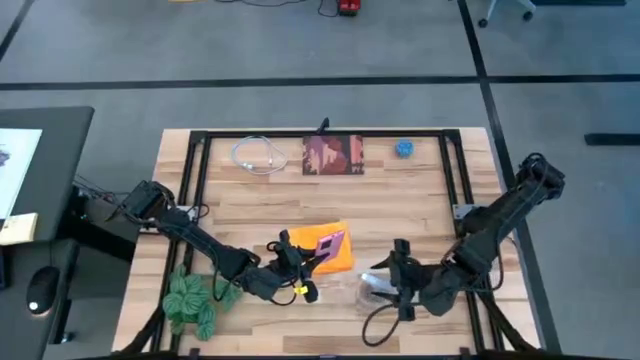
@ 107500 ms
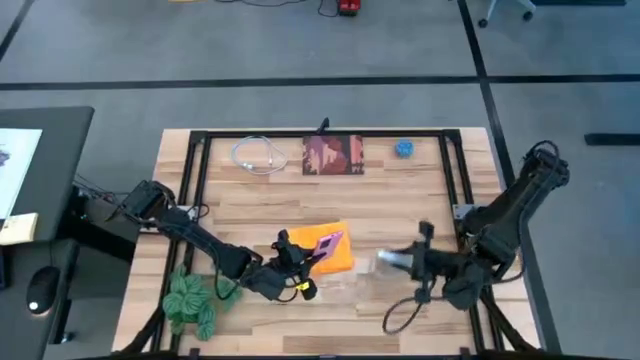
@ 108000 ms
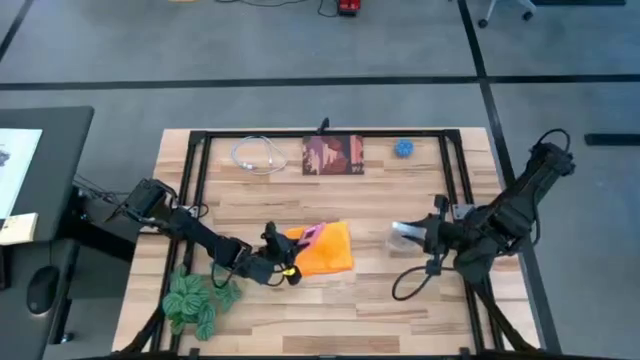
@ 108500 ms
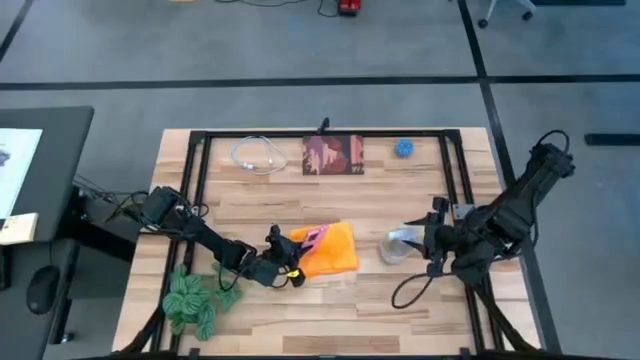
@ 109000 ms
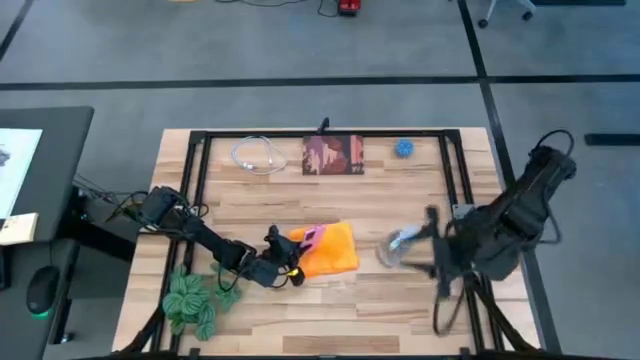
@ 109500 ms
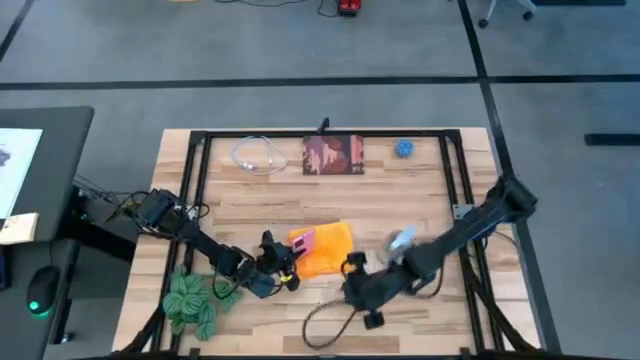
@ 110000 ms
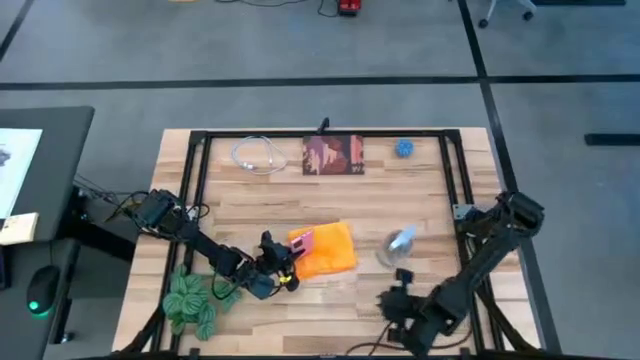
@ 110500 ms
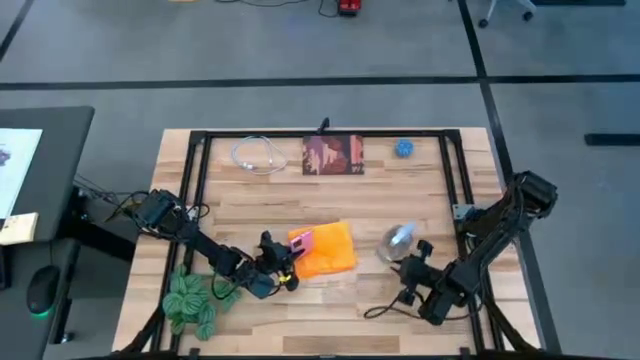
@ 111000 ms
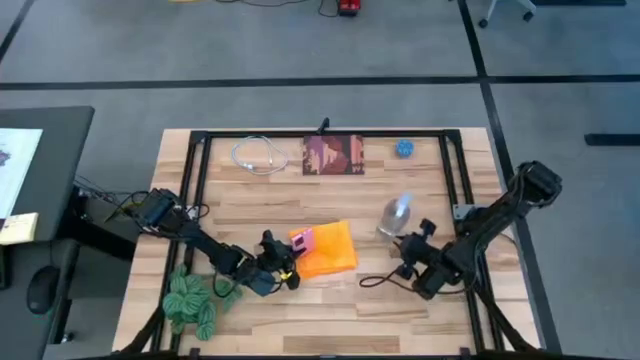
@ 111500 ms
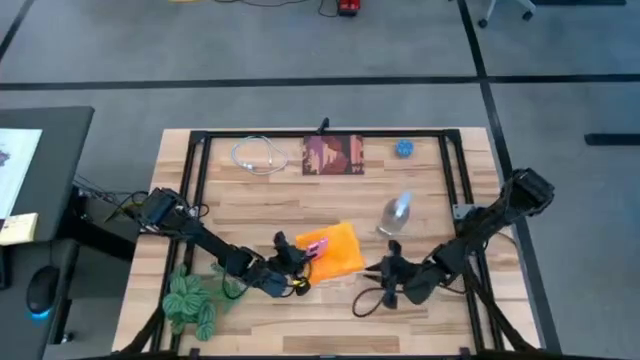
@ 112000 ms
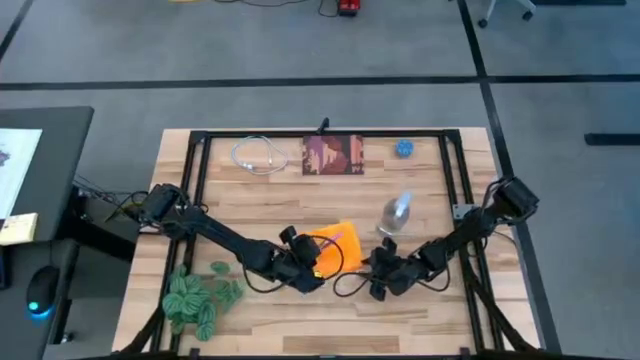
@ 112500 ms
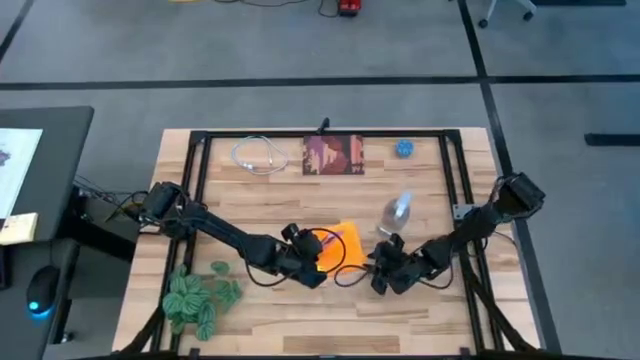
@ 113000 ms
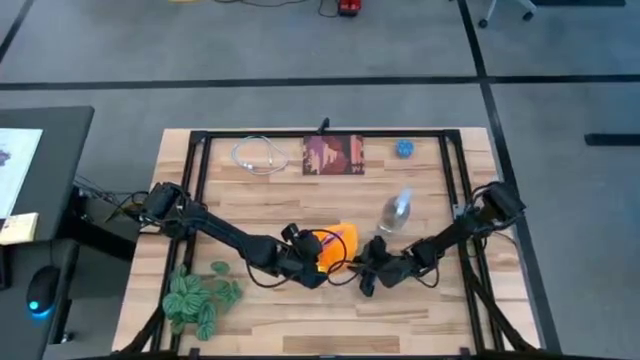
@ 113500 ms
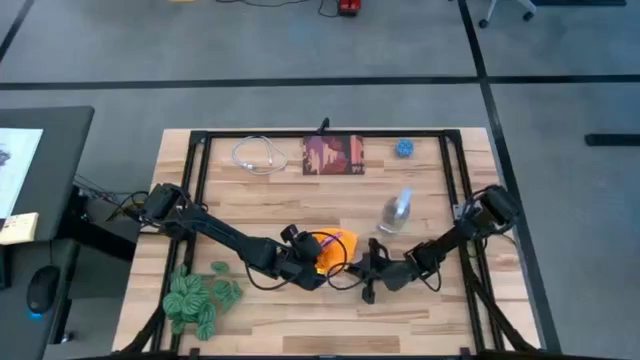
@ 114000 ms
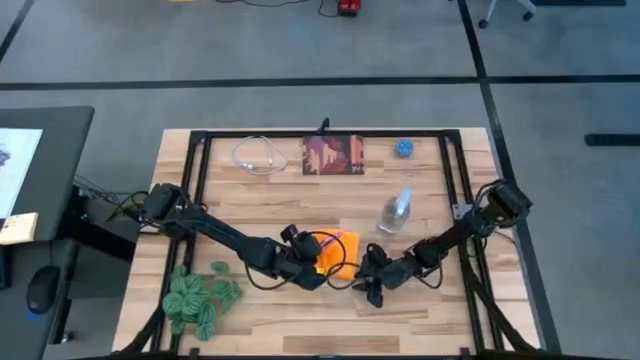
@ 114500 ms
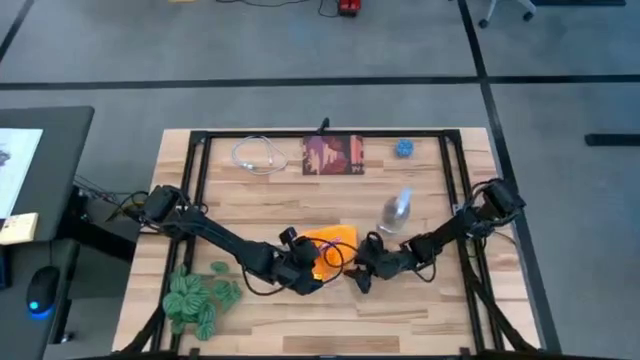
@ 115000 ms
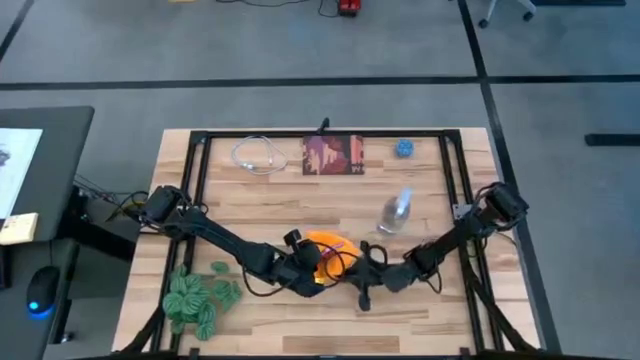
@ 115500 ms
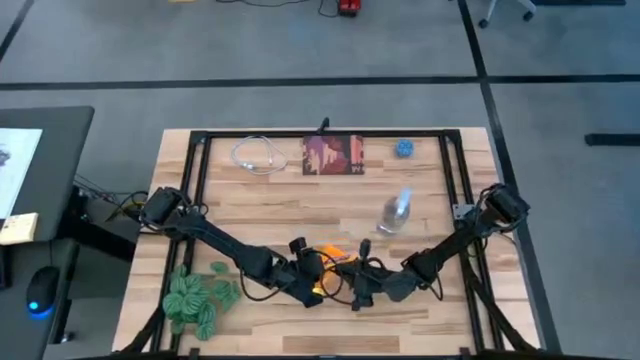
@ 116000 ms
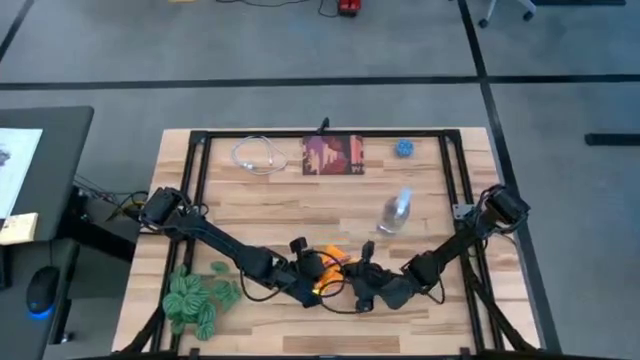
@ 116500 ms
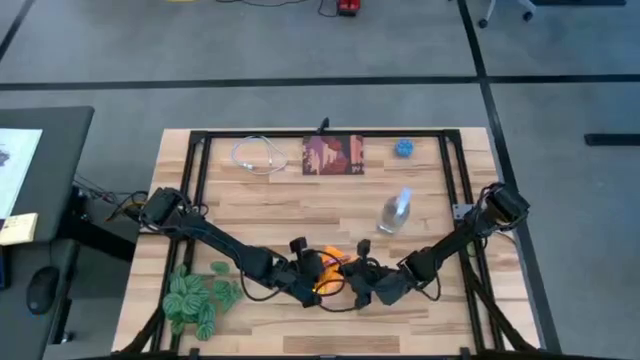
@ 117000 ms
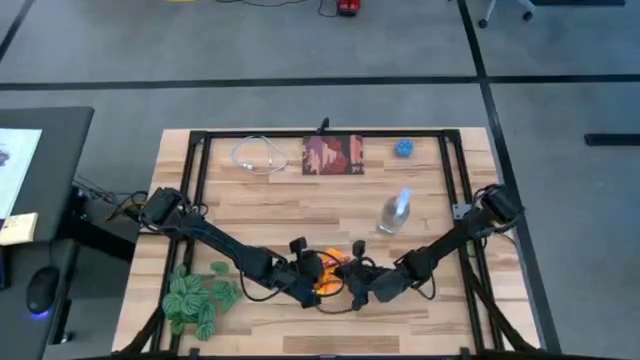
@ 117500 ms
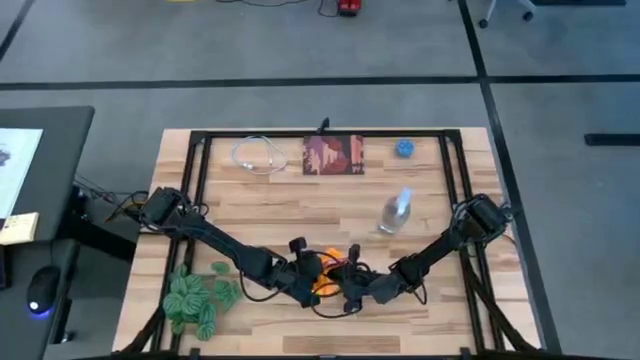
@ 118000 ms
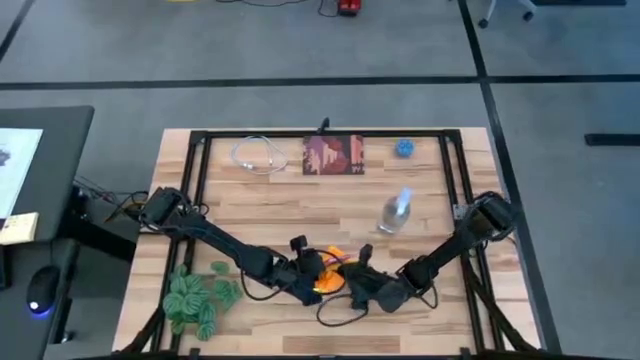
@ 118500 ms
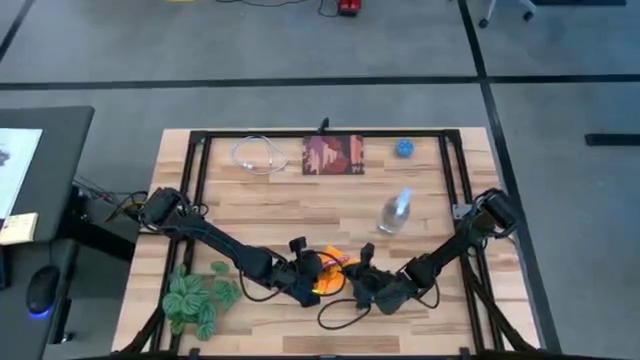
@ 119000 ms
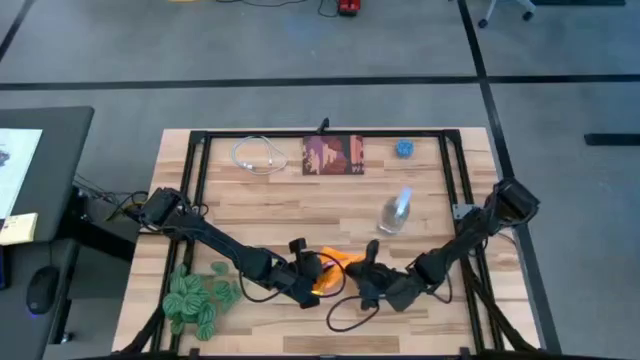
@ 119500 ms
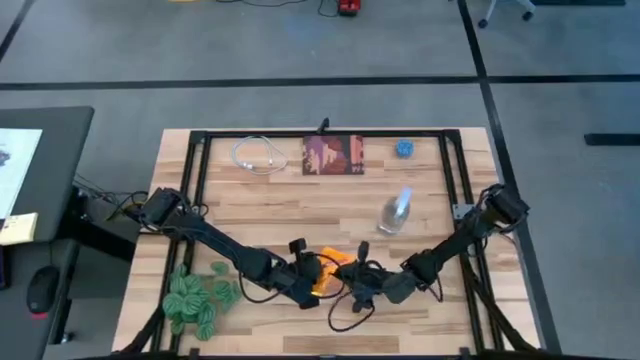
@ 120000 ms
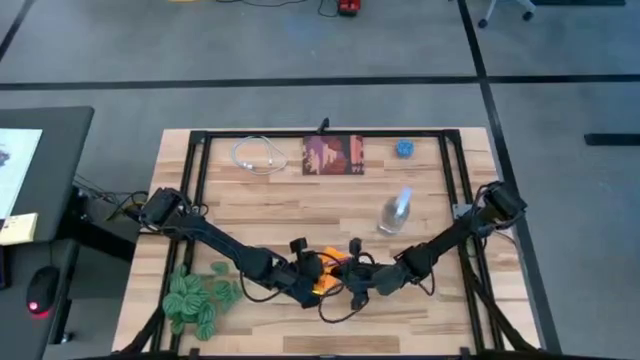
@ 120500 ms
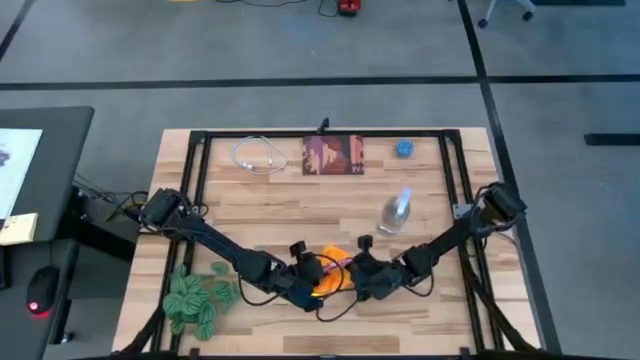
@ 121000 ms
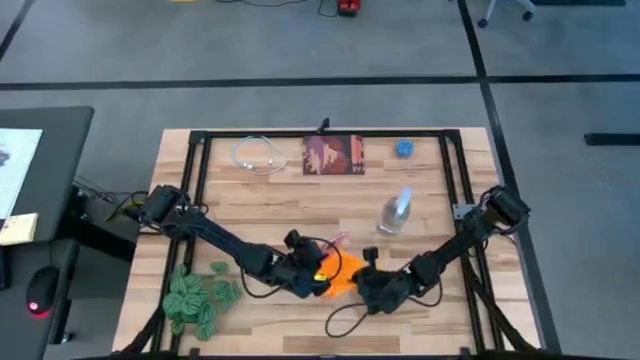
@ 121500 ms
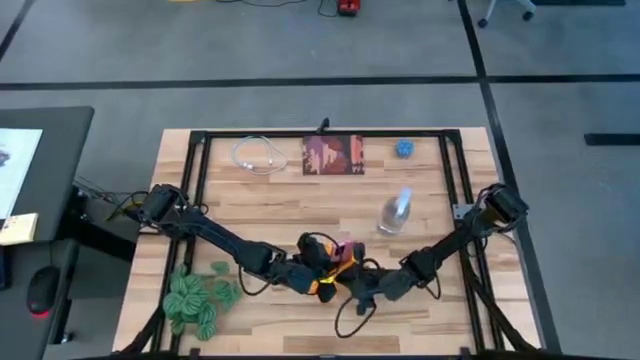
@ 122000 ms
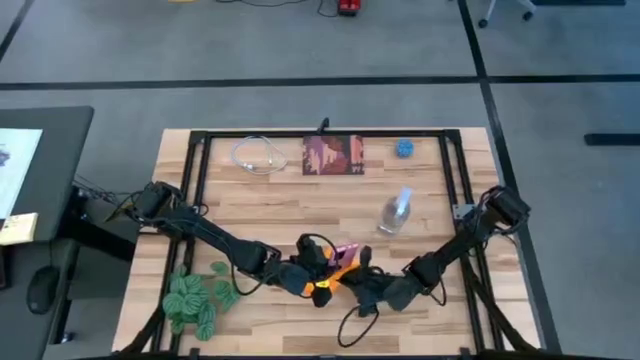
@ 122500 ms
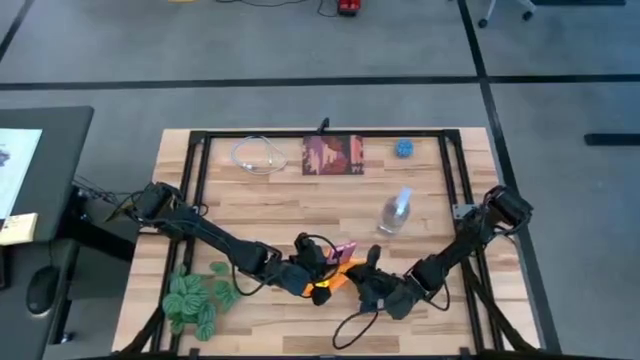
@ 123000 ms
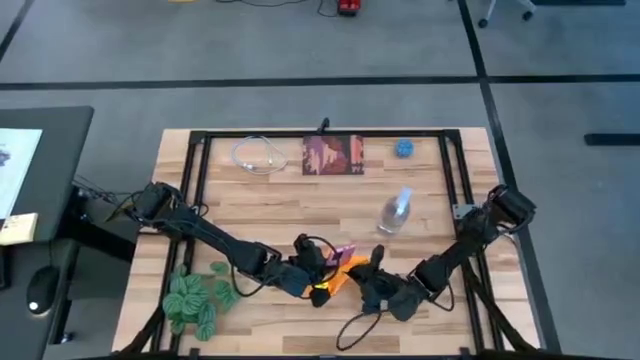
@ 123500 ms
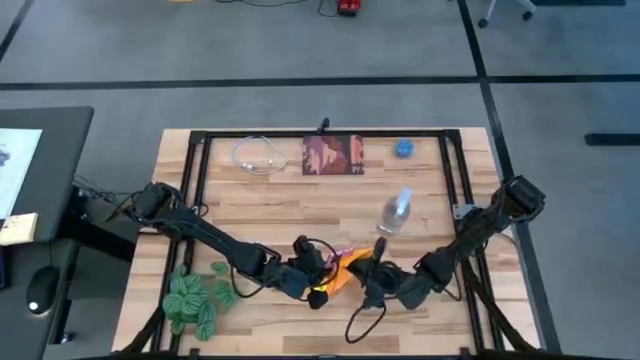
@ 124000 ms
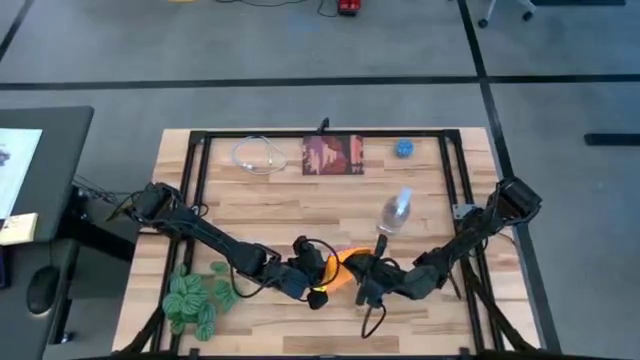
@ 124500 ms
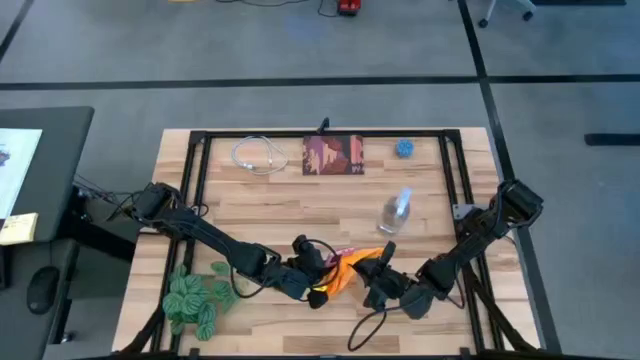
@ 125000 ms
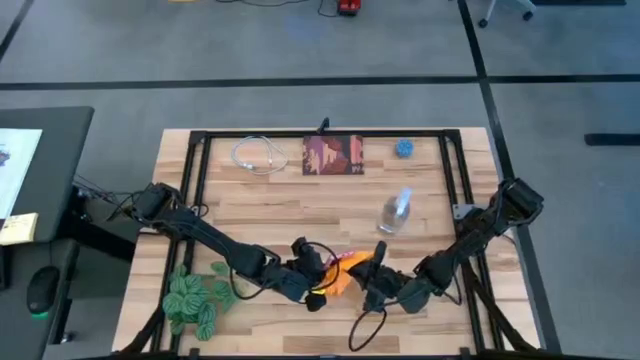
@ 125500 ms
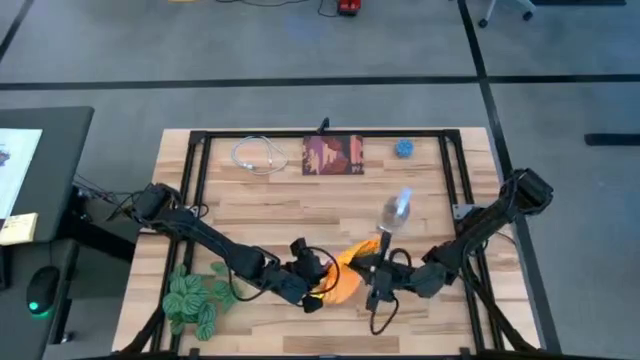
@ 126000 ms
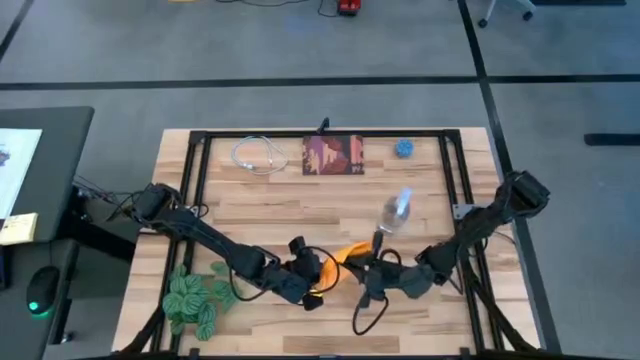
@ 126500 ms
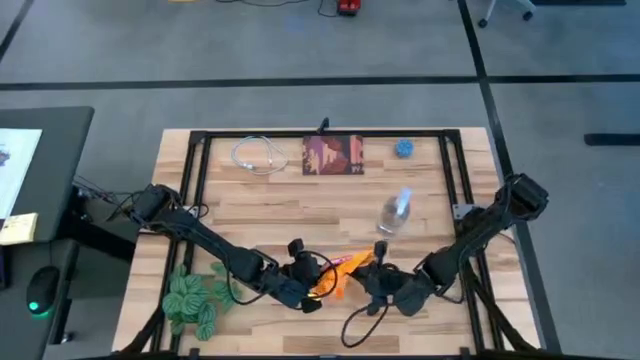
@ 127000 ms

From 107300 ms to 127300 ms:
Task: Apply microfiber cloth
Wipe the pink cellphone using microfiber cloth
